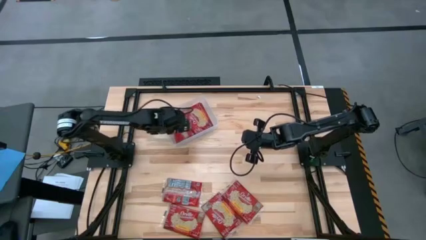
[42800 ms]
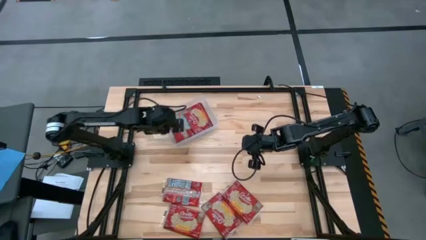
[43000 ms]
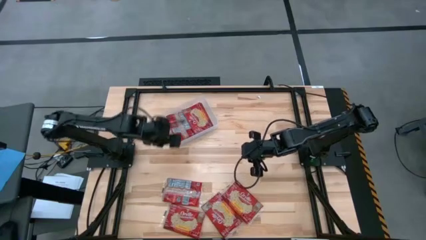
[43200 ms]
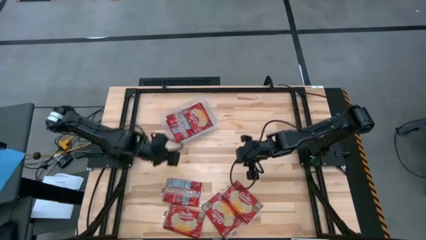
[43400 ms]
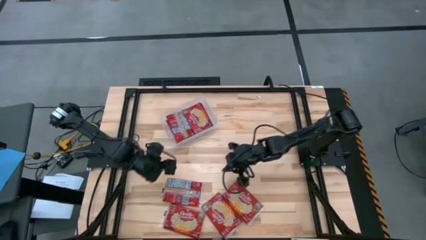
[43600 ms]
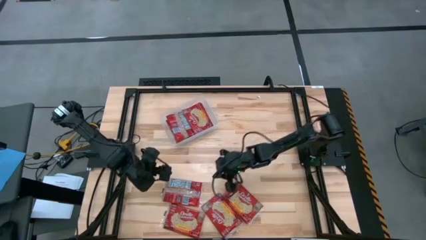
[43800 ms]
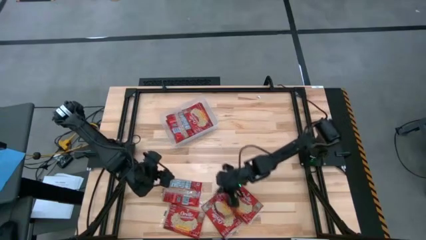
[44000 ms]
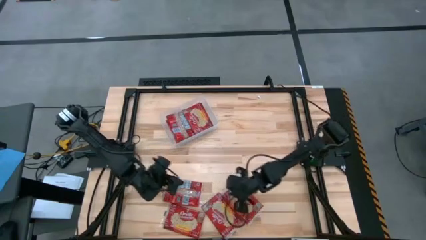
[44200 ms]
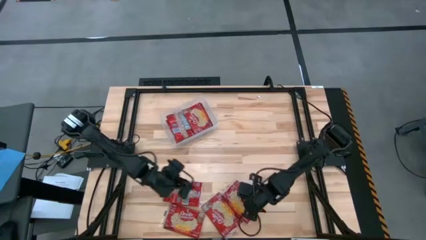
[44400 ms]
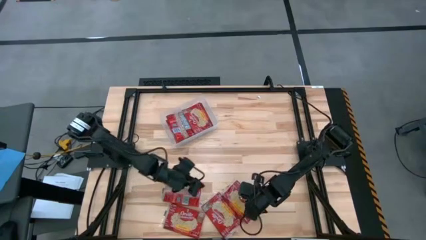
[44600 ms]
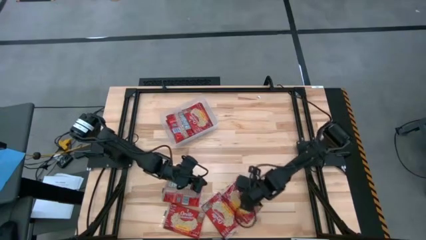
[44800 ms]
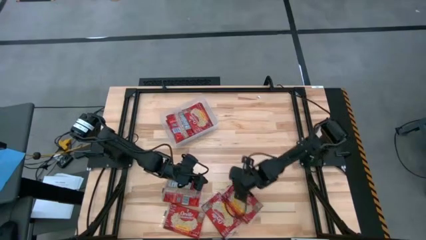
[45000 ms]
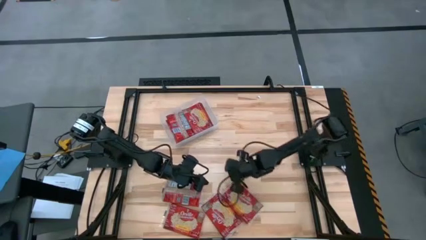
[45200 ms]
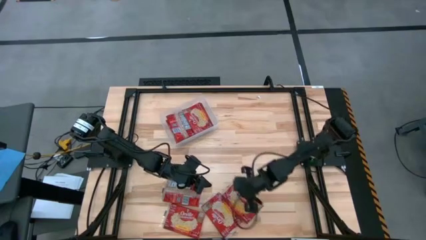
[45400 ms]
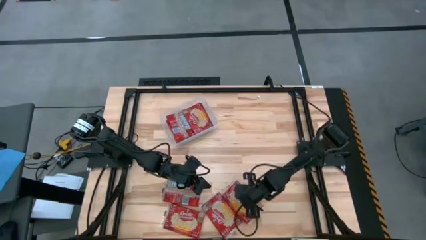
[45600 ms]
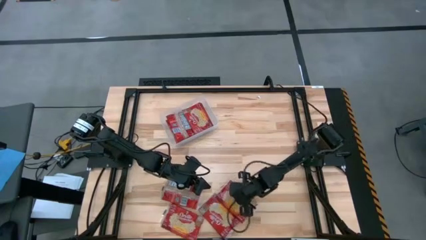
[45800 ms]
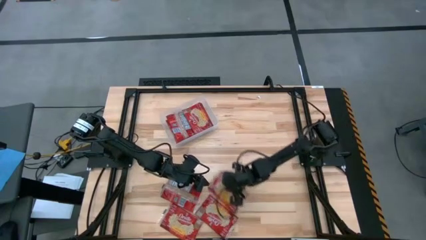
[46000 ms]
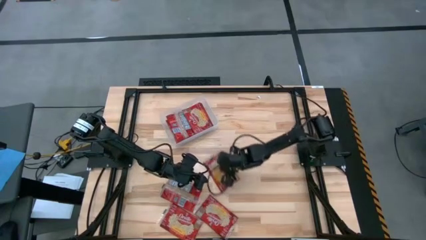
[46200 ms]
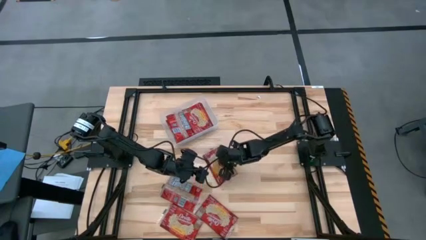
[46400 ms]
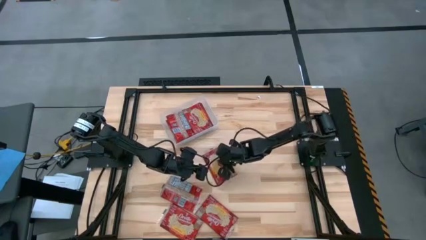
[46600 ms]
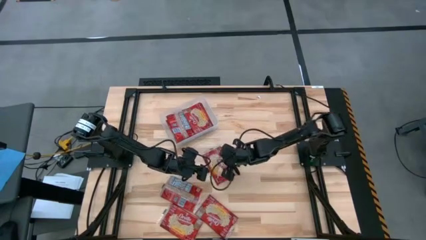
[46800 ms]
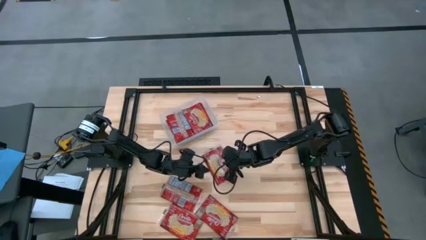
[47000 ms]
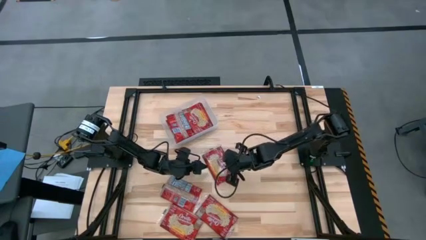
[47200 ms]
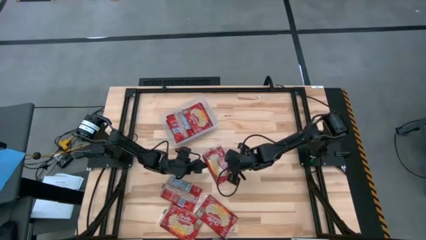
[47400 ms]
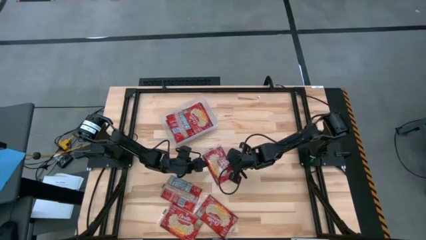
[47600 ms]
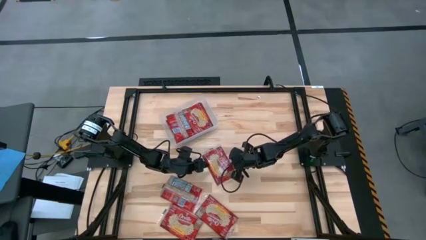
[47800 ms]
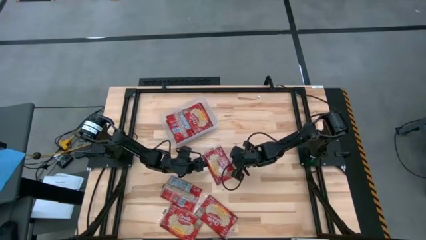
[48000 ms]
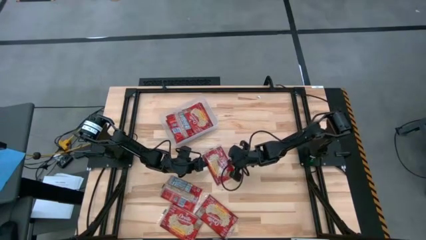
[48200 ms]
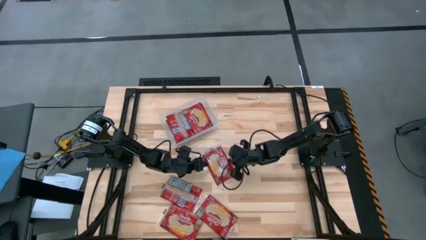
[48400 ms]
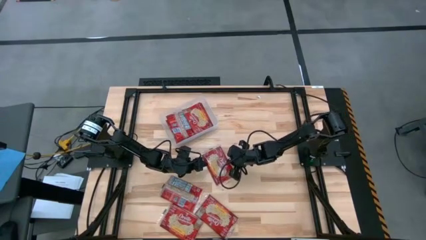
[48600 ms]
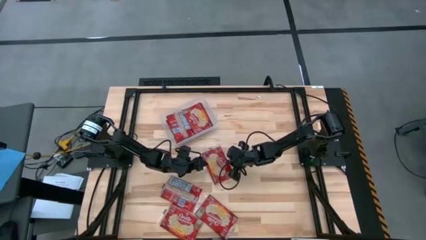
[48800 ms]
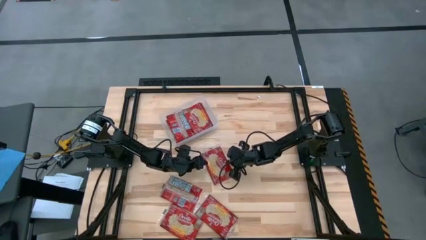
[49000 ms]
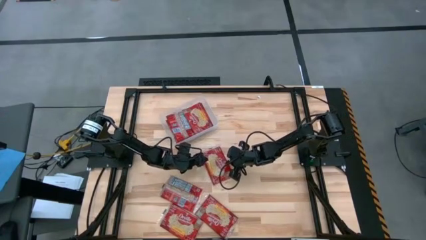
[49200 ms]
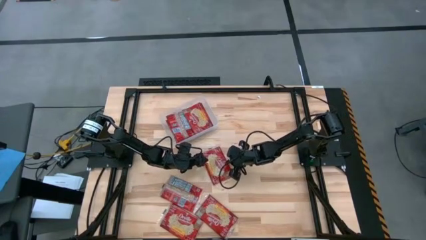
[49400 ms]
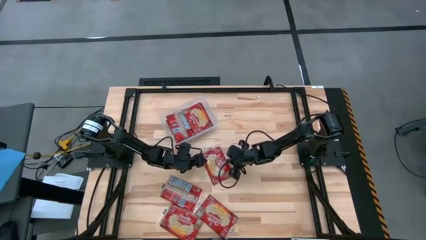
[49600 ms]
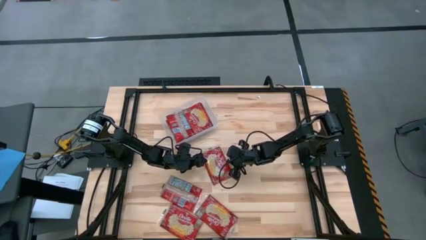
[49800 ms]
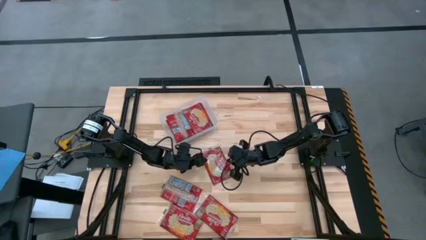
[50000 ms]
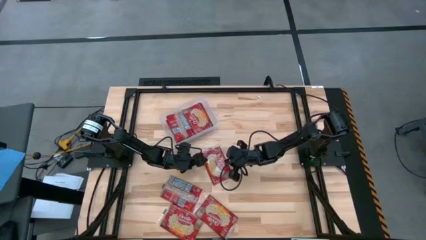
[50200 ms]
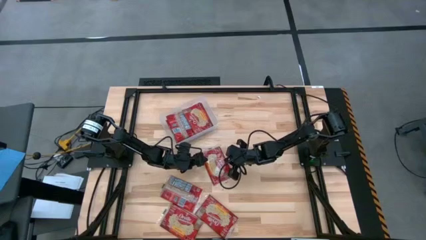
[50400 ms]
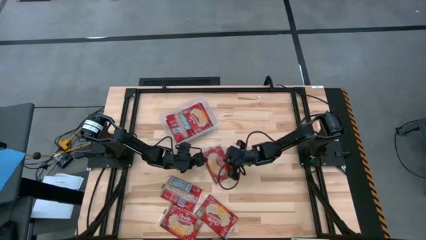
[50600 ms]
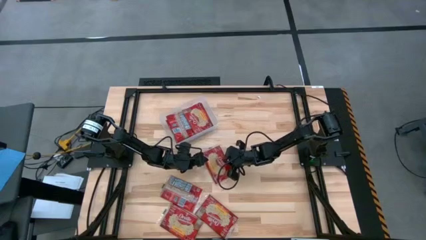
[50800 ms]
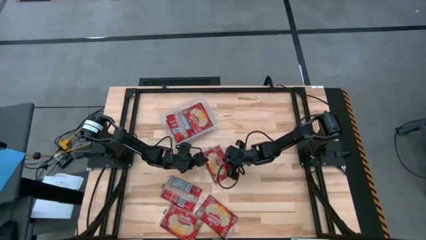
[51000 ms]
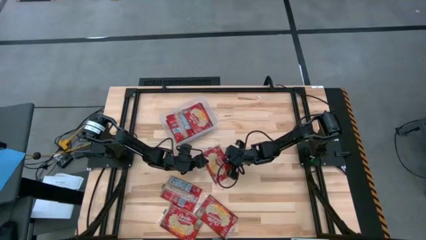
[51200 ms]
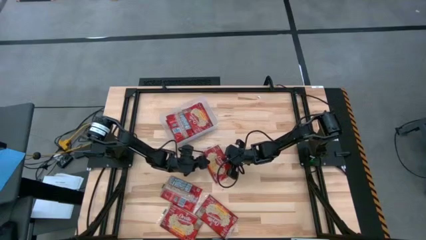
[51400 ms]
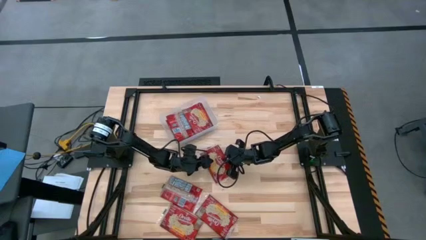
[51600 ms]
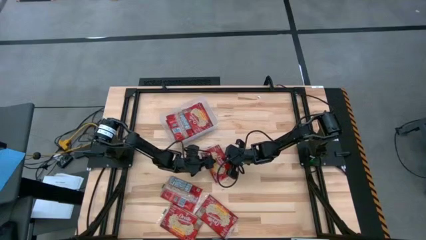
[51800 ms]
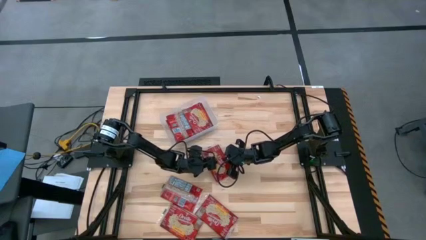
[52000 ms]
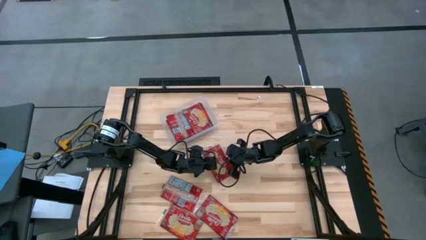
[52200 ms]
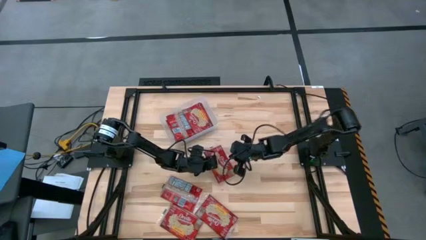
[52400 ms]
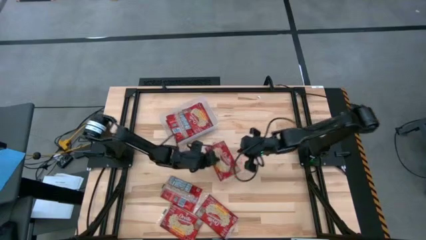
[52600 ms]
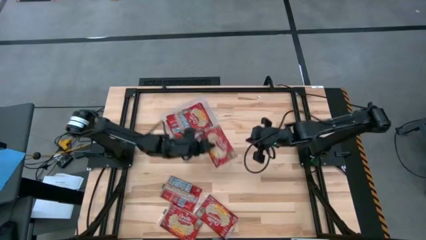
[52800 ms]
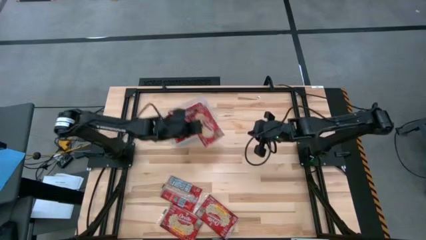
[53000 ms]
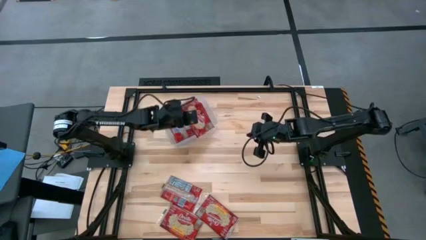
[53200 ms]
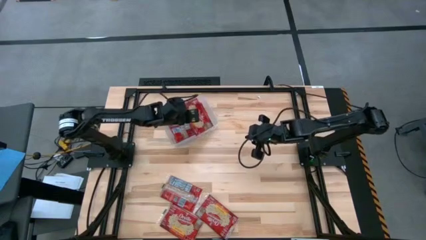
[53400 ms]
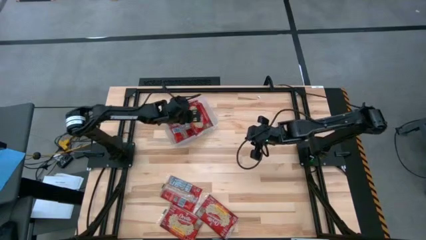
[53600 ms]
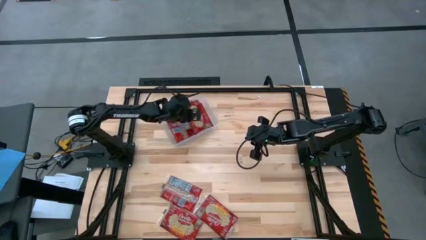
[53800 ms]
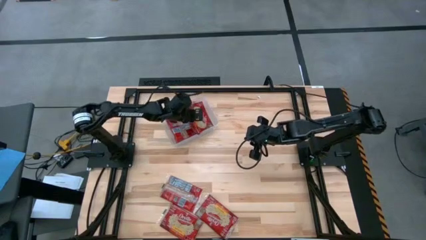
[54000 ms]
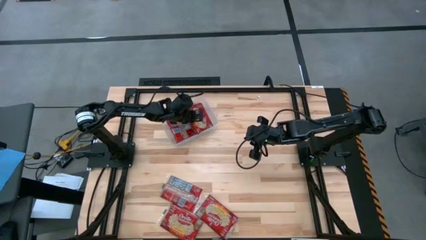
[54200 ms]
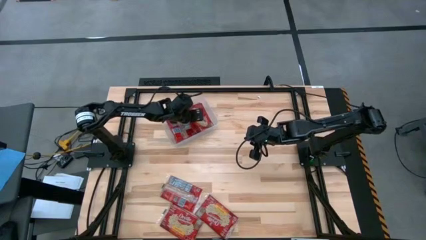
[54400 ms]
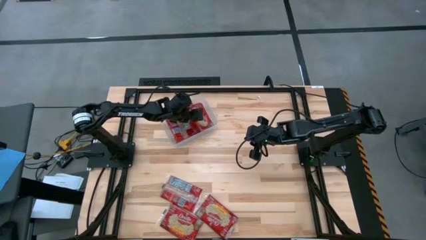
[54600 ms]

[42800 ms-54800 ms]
Task: Sort popcorn bags into baskets
Put the red popcorn bag into the transparent bin

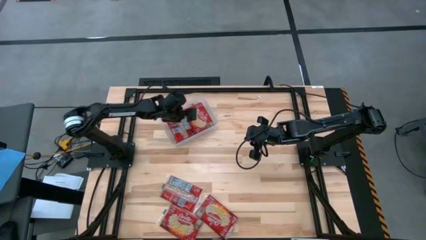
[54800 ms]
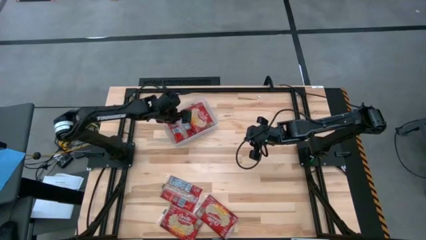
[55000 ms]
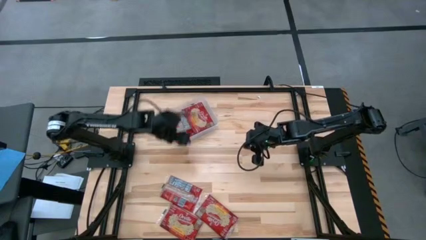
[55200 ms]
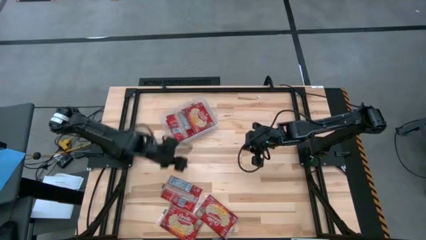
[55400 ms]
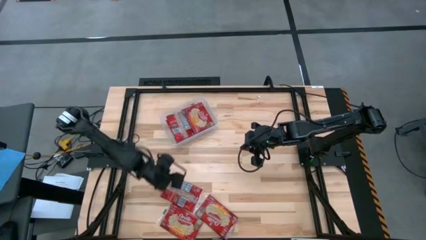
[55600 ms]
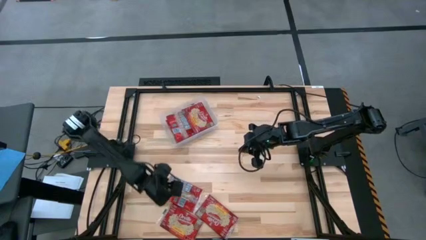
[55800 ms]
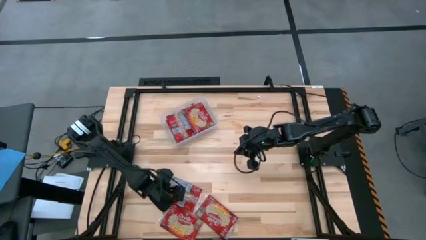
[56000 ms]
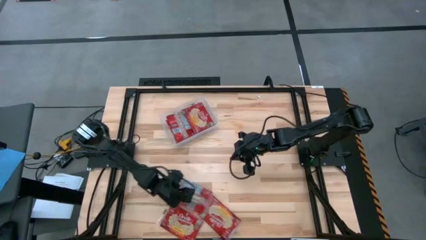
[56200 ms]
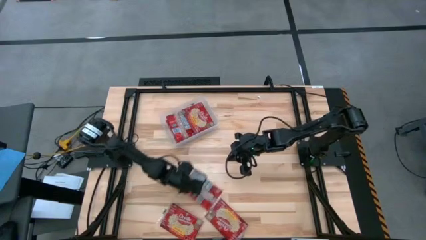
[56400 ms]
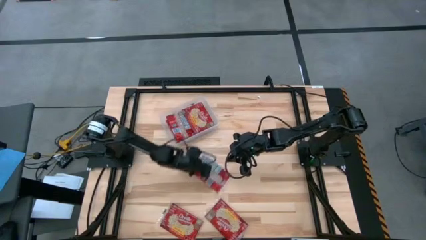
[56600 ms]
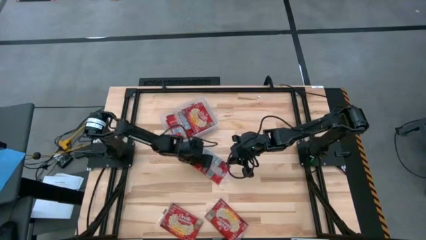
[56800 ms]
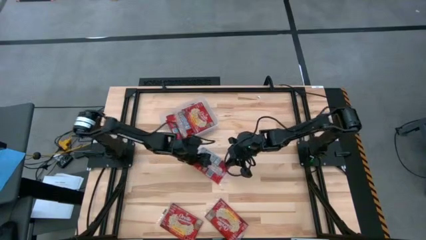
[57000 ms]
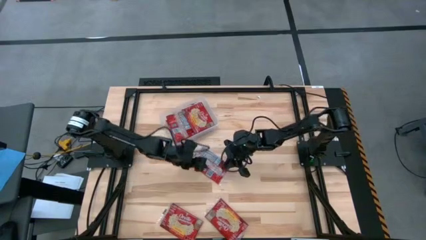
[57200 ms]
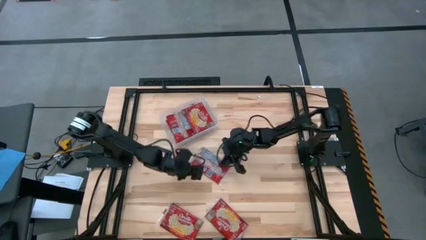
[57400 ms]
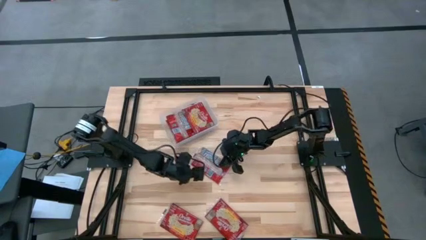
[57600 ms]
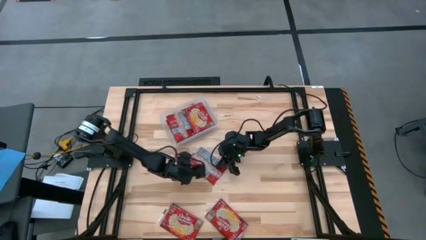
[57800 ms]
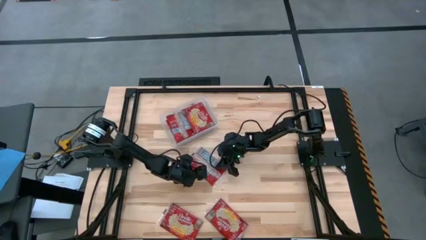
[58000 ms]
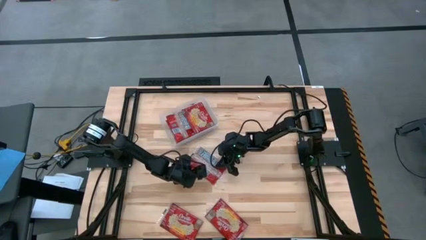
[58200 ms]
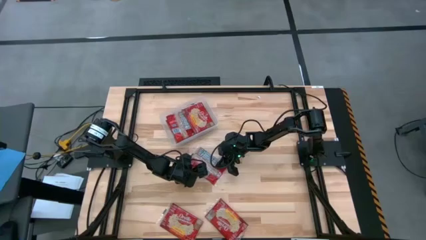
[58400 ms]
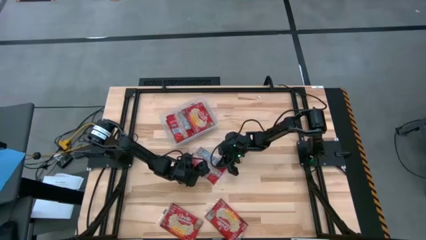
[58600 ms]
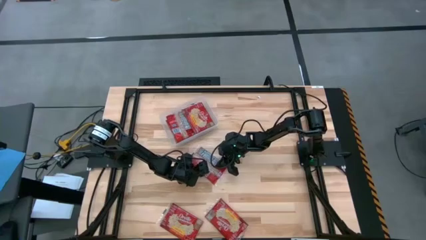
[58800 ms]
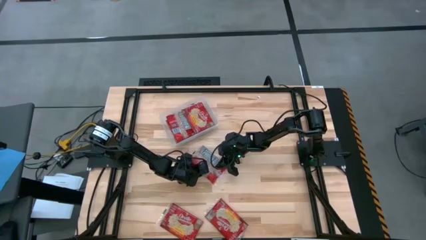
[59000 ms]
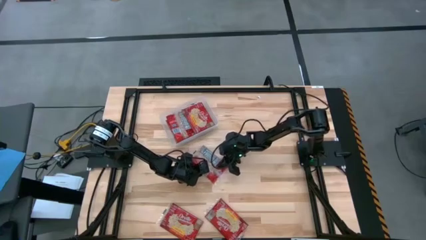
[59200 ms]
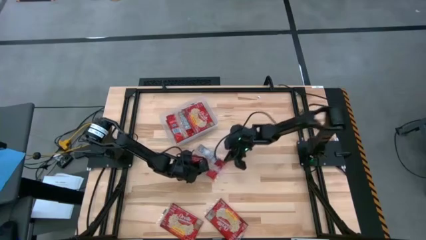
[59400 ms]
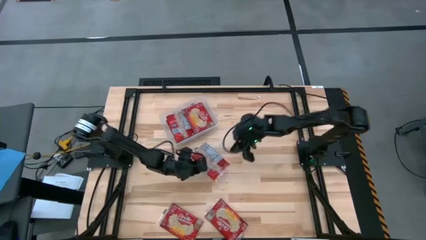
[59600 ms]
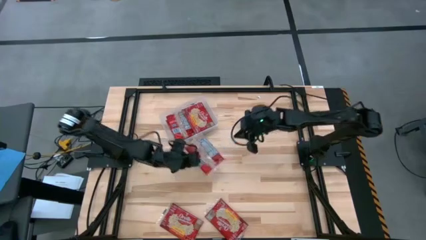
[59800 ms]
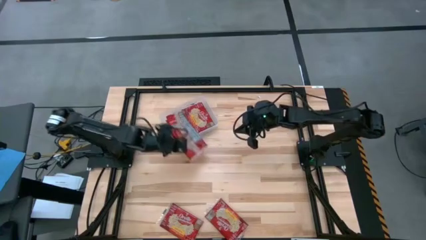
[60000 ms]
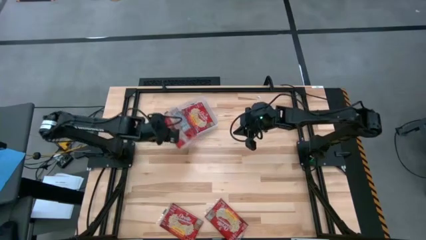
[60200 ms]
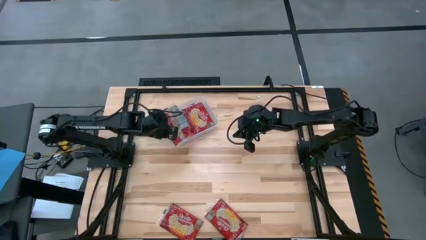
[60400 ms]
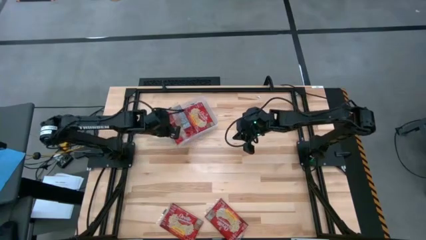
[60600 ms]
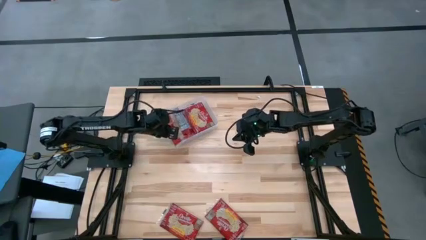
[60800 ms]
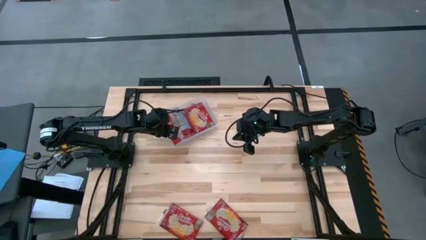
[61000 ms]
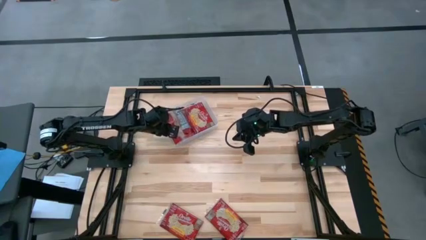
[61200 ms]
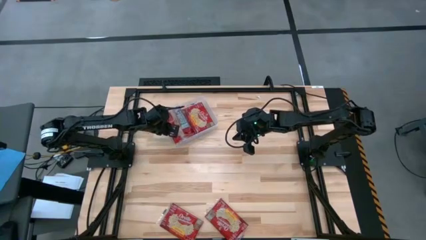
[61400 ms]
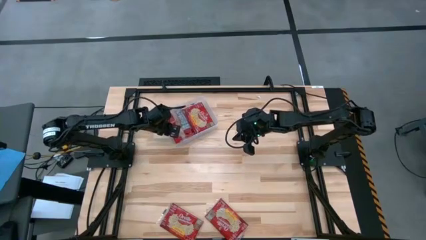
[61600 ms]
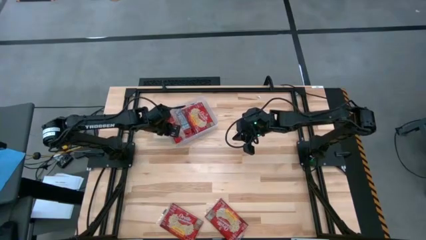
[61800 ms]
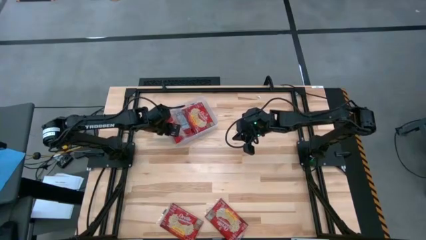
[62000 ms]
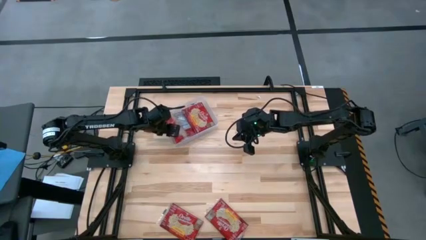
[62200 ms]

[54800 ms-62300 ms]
Put the top red popcorn bag into the transparent bin
